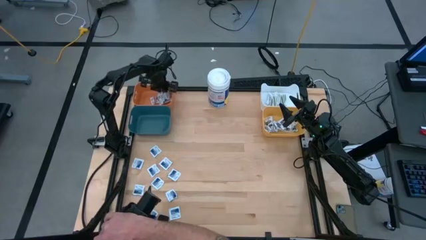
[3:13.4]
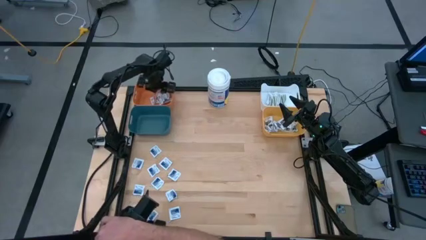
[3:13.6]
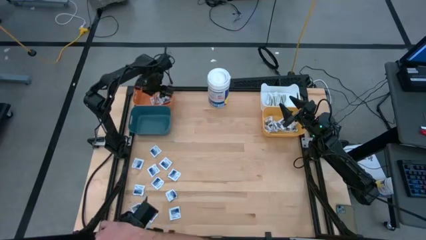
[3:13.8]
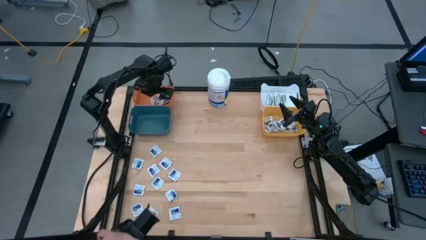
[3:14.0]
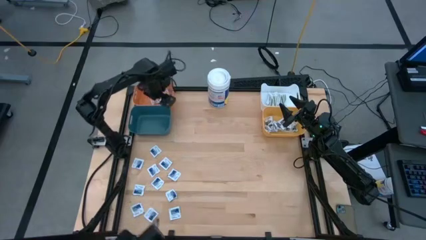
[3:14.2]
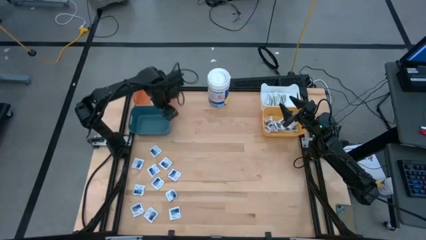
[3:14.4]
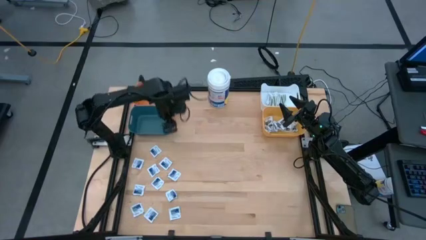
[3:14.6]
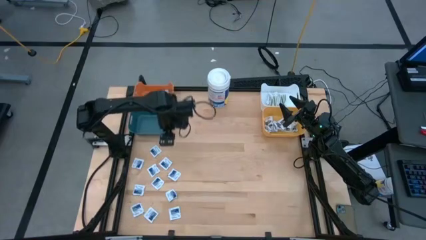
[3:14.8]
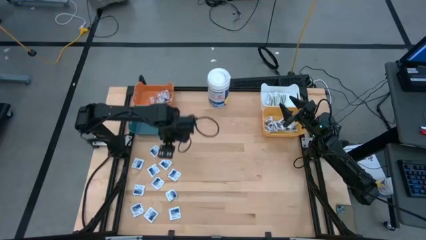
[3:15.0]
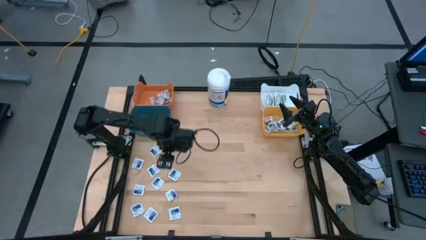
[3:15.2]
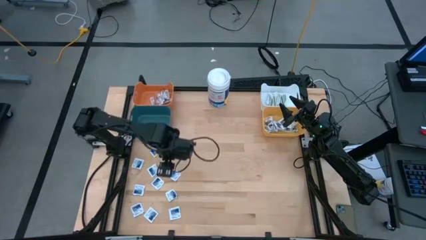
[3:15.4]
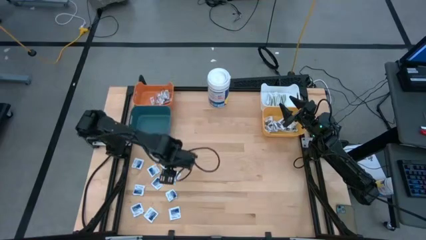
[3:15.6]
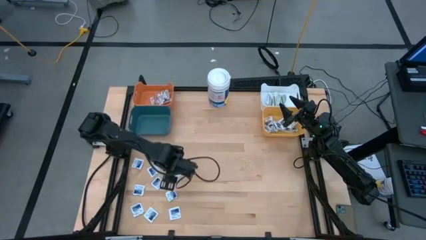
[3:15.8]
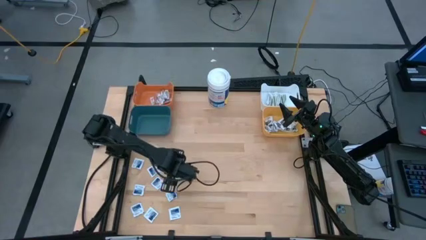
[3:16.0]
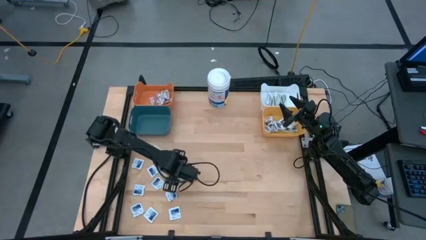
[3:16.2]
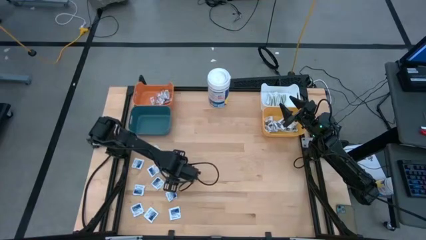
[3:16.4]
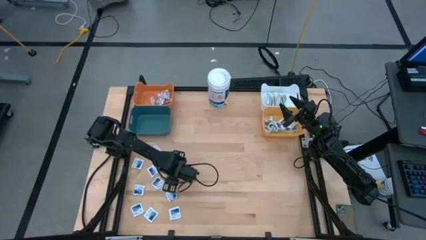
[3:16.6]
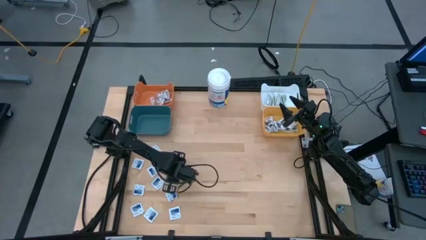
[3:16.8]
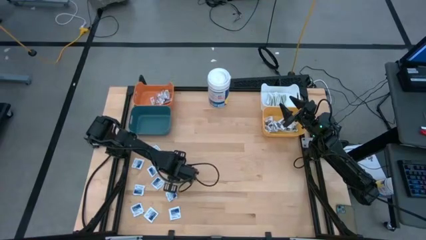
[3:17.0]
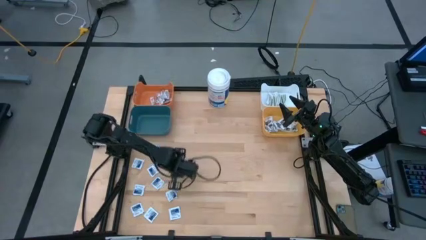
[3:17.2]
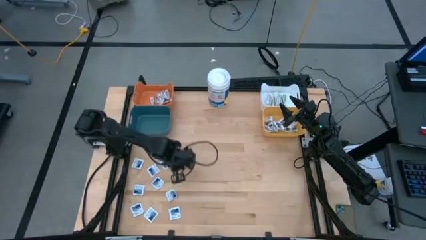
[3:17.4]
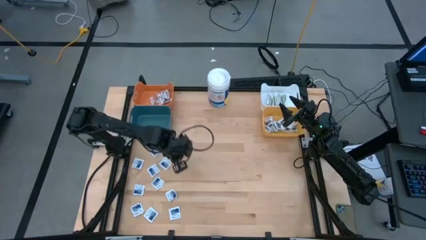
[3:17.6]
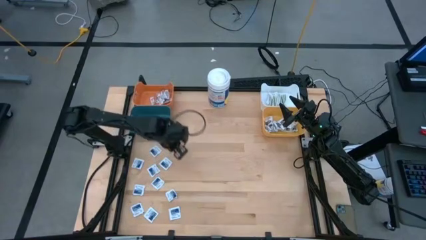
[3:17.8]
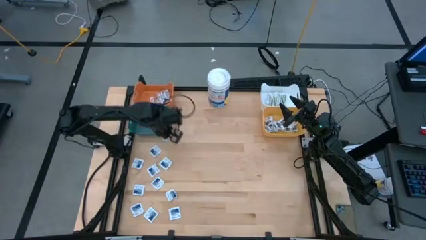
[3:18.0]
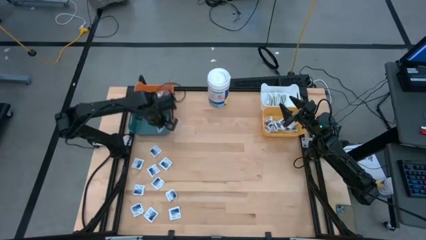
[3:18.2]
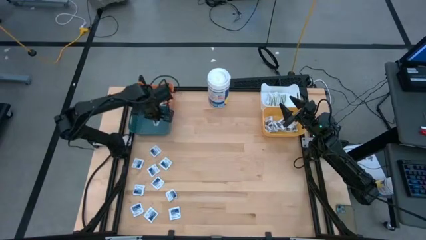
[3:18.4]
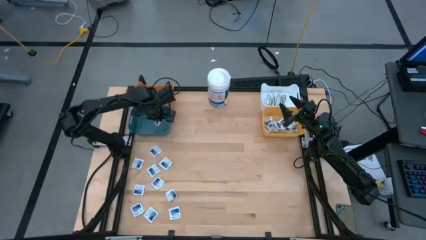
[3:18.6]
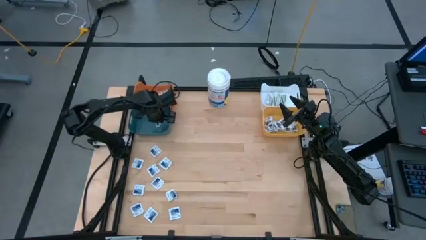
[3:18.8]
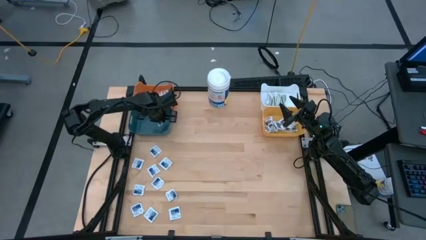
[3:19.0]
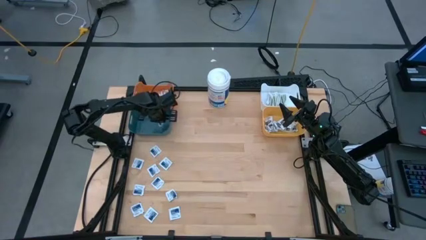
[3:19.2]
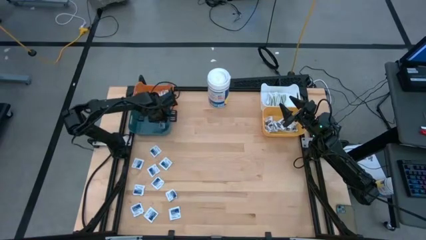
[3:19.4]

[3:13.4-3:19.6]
Task: Pick & Place First Aid Supplies
Put the blue pad into the blue bin

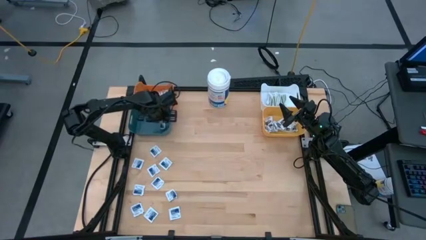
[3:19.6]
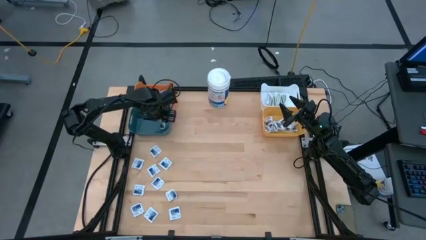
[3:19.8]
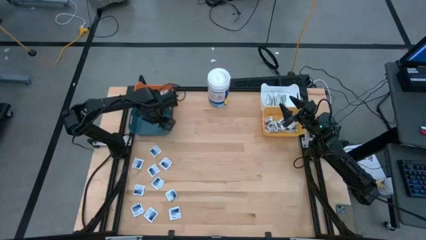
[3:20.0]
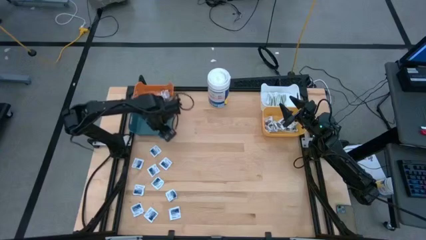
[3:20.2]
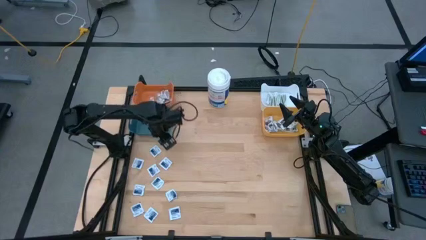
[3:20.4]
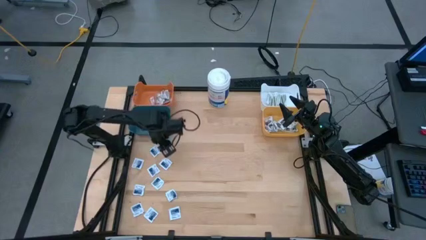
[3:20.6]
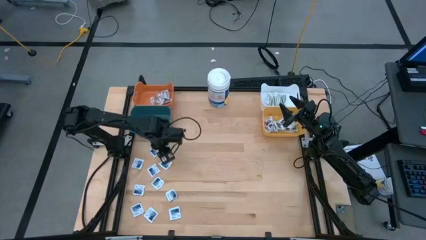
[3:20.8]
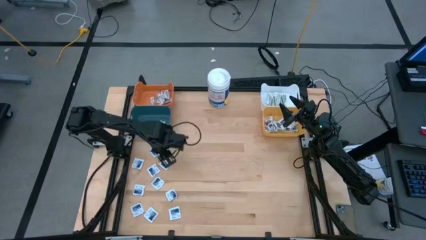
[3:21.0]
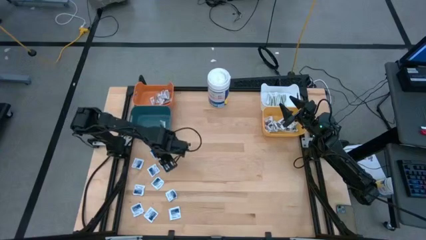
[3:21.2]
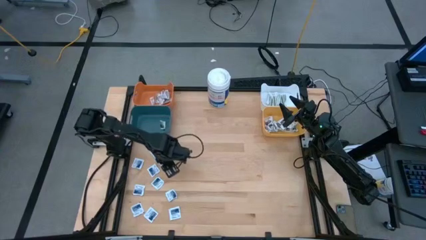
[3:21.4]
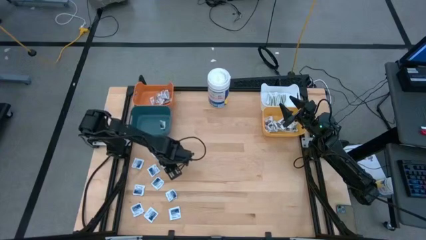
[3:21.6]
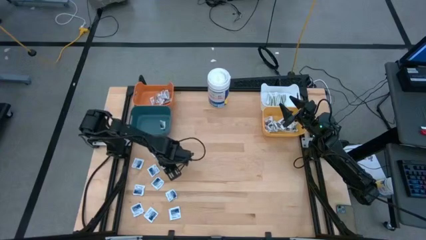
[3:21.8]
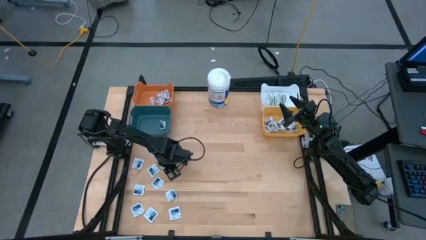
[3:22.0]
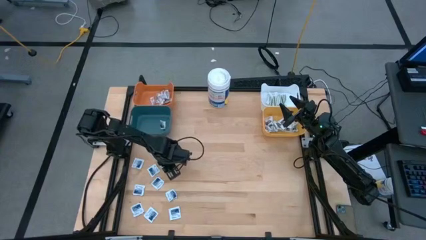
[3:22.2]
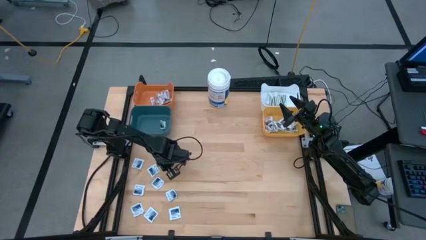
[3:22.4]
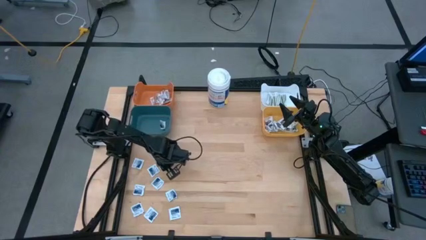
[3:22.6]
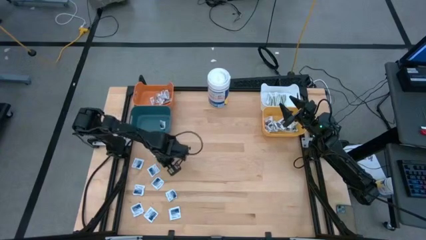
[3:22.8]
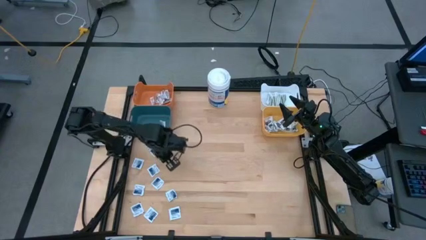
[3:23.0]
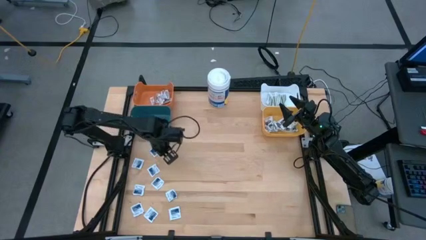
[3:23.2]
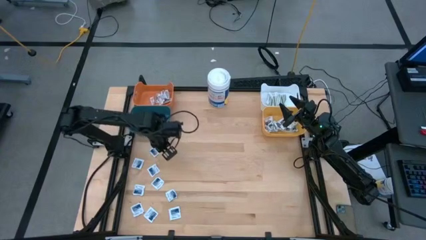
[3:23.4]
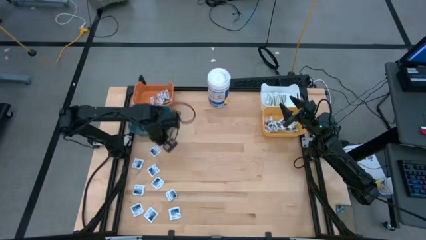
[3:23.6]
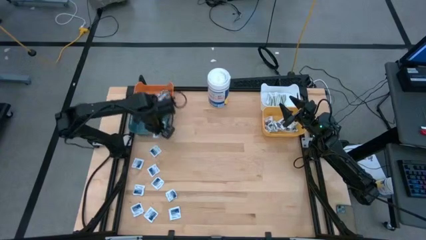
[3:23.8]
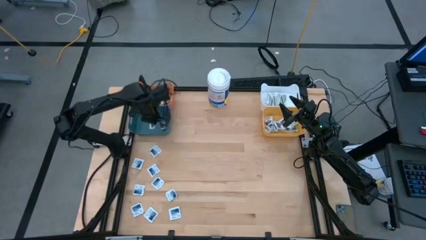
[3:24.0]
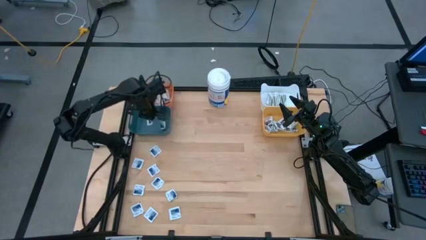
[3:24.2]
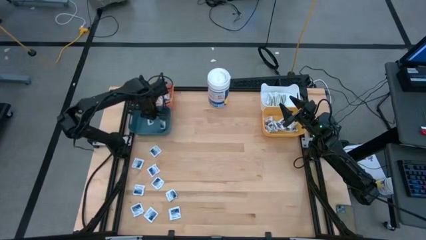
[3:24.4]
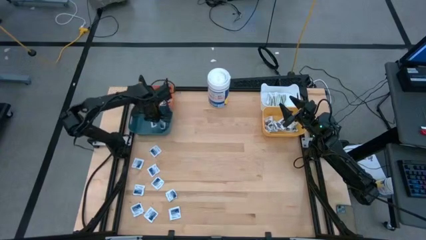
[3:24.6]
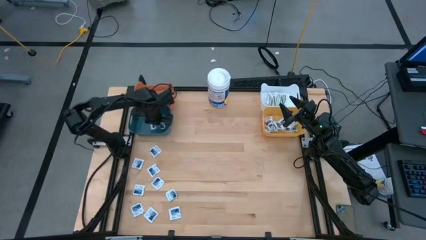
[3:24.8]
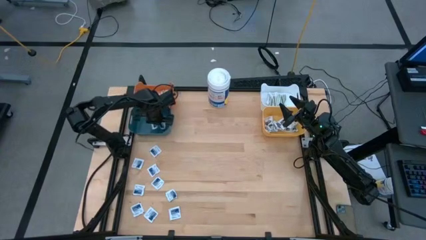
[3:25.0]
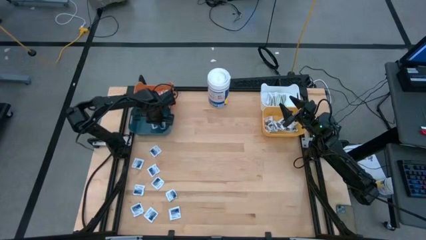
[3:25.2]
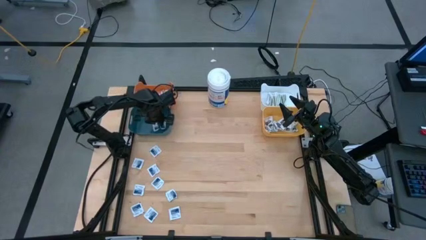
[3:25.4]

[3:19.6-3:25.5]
Put the blue pad into the blue bin

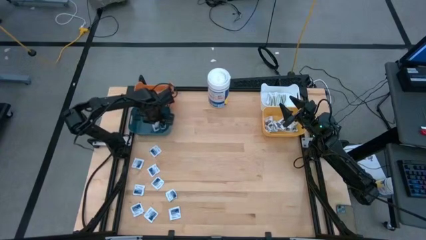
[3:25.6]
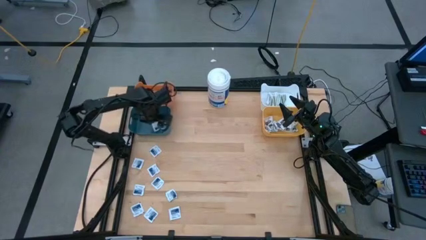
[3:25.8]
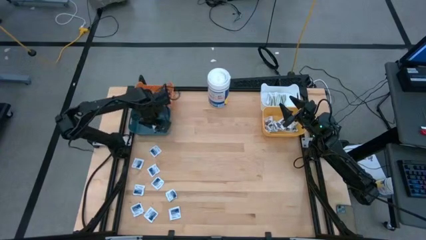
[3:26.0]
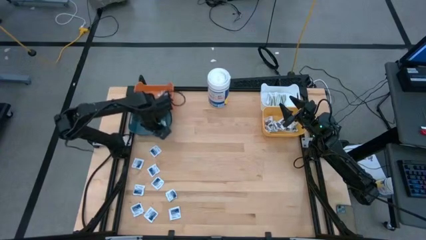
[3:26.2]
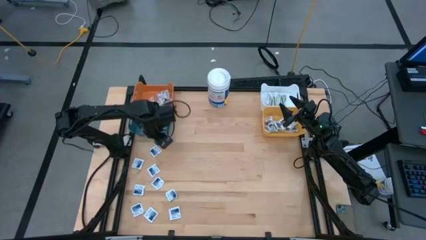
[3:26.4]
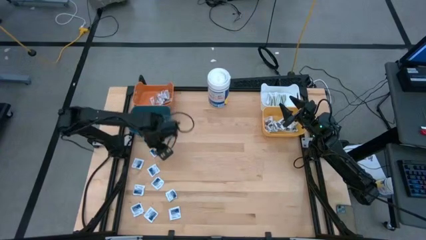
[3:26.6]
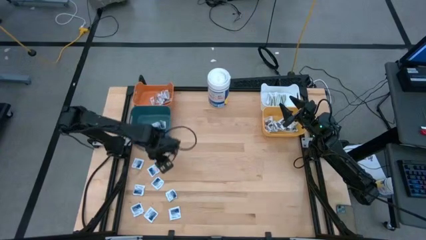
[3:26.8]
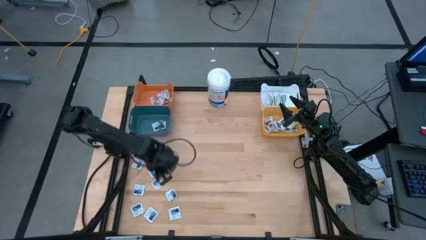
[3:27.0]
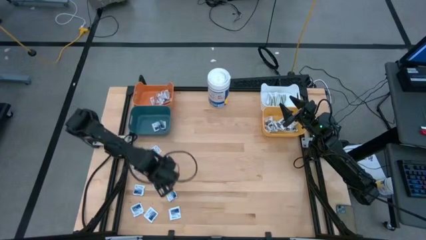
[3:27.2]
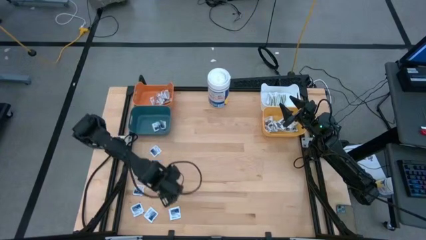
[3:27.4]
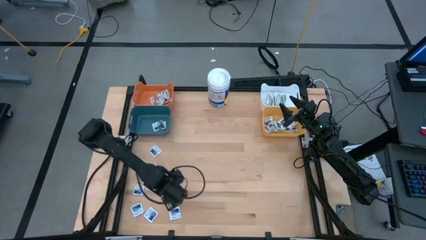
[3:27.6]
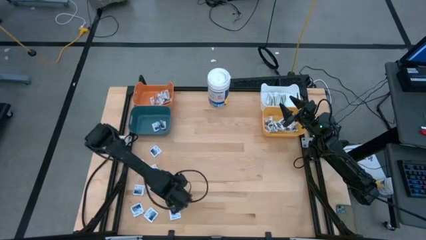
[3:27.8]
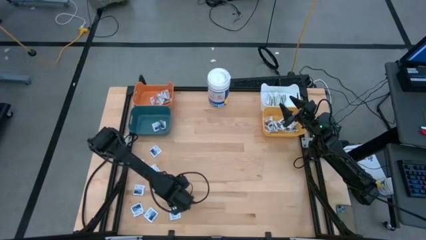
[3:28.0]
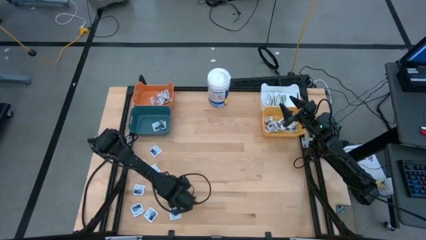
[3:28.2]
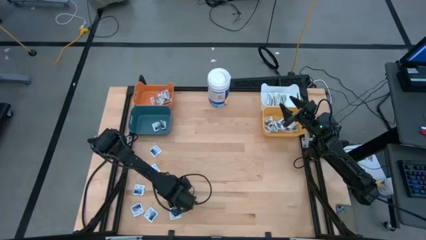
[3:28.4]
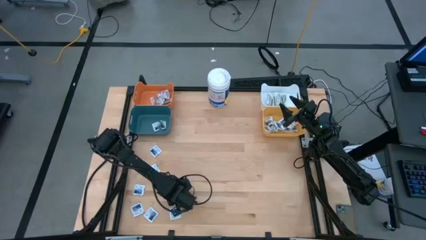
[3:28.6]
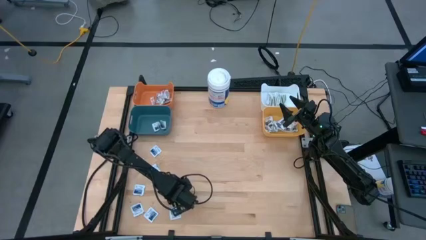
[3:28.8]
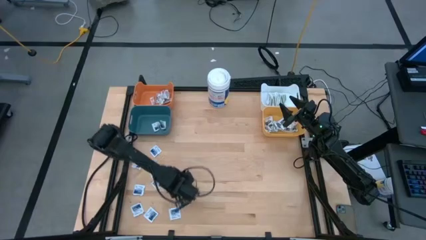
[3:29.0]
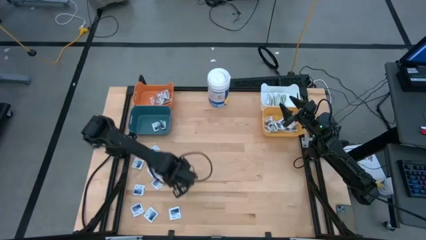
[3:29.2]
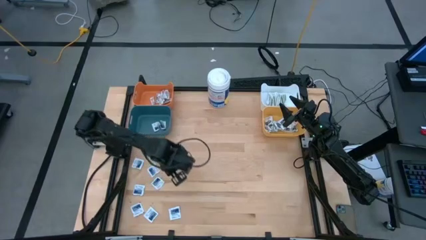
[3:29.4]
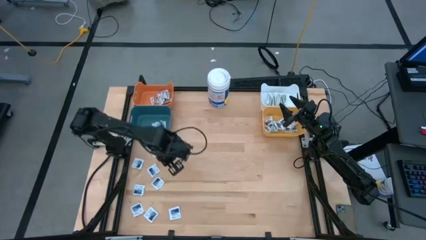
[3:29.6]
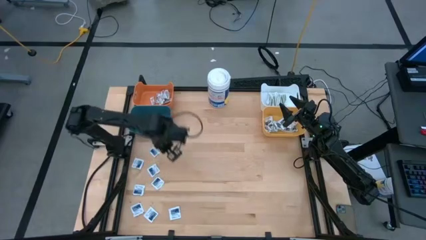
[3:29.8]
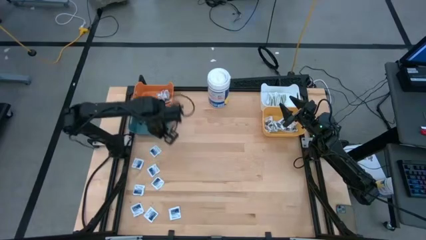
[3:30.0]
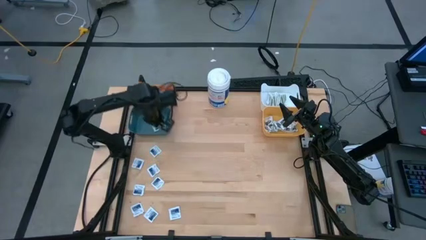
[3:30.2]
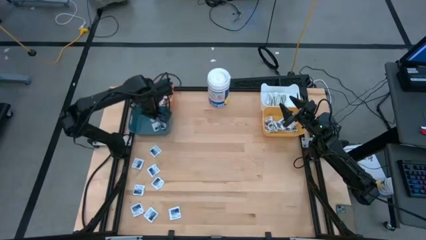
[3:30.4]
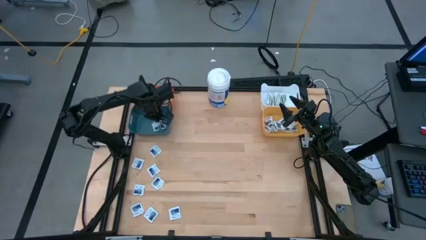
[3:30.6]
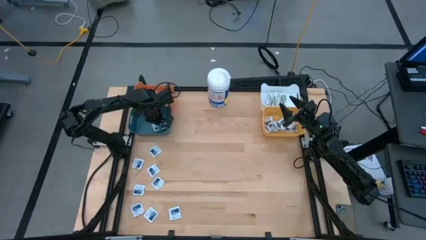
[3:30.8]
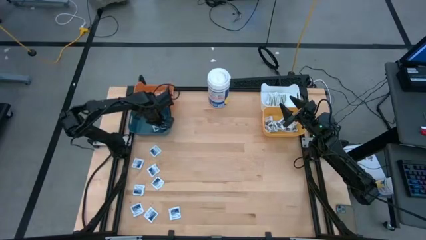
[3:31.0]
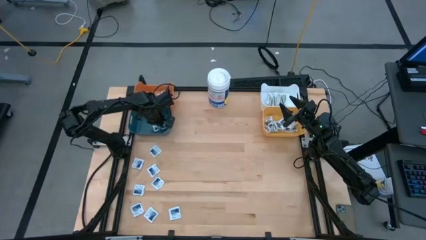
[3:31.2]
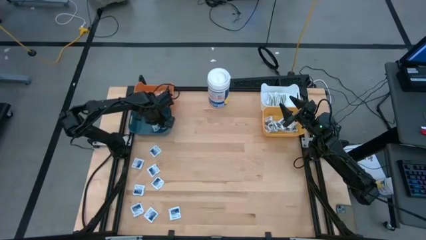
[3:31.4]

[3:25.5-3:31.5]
Put the blue pad into the blue bin
